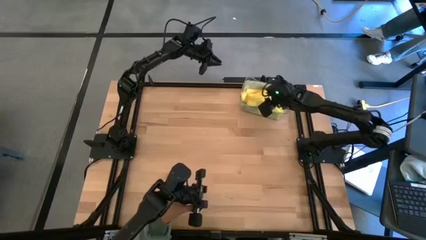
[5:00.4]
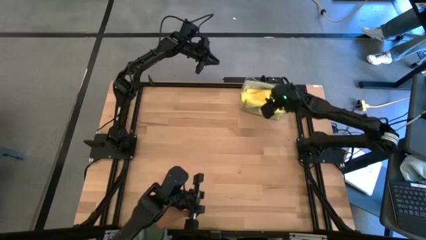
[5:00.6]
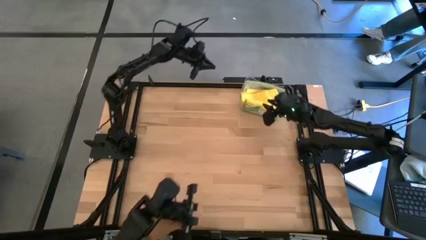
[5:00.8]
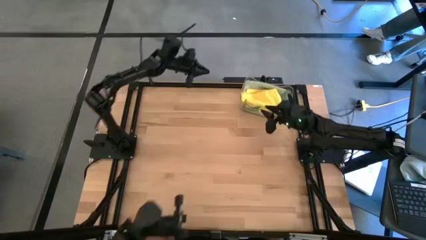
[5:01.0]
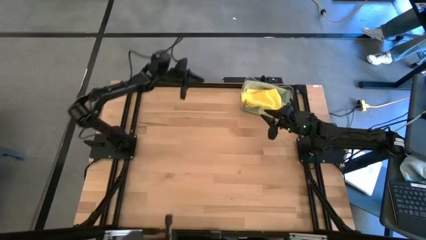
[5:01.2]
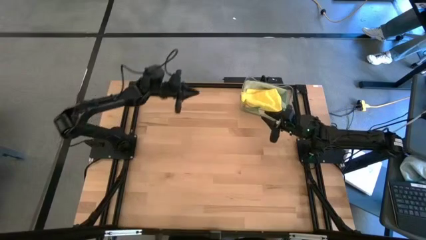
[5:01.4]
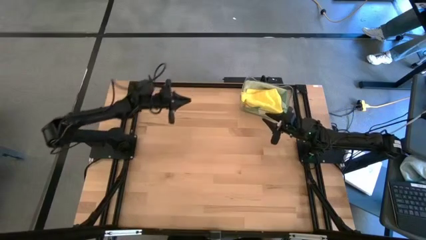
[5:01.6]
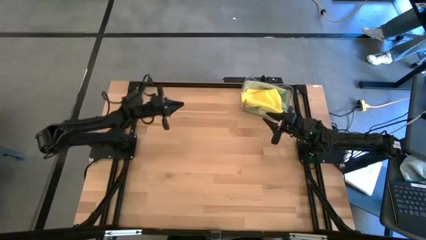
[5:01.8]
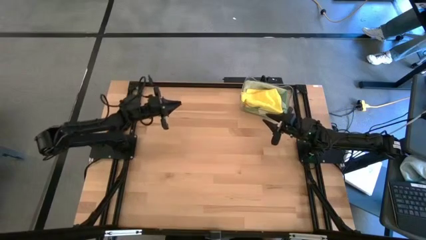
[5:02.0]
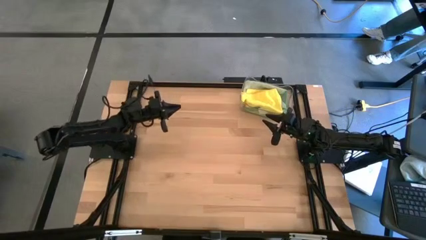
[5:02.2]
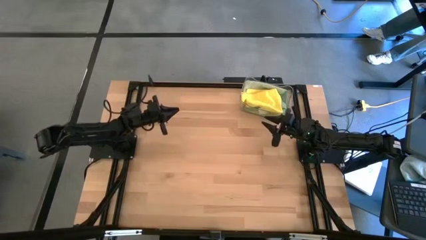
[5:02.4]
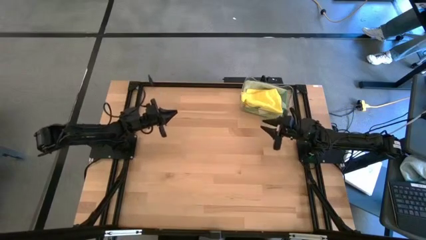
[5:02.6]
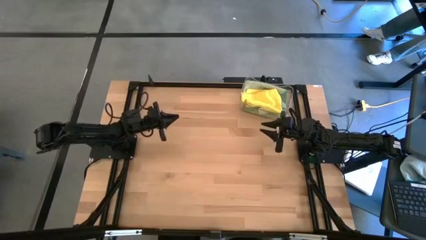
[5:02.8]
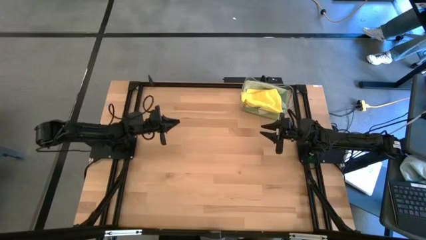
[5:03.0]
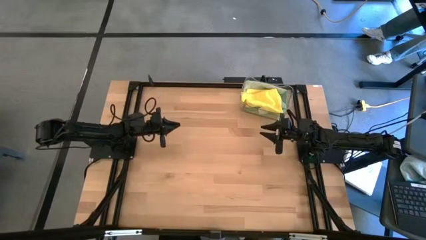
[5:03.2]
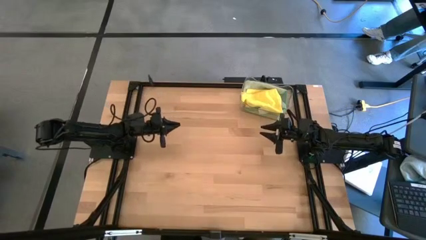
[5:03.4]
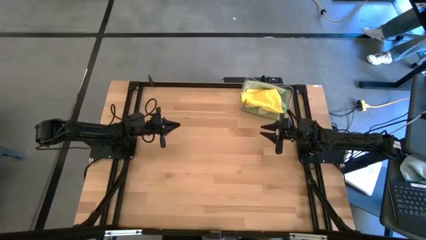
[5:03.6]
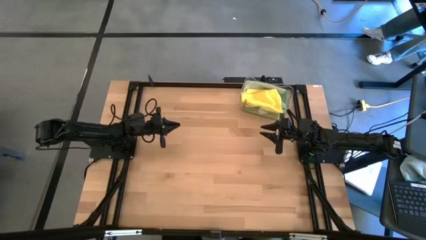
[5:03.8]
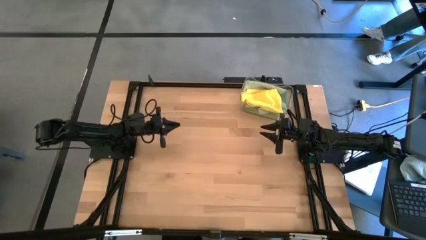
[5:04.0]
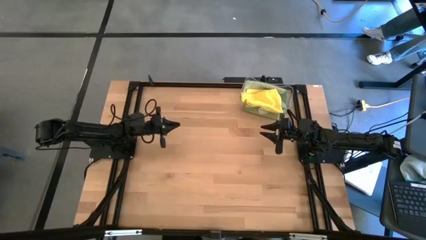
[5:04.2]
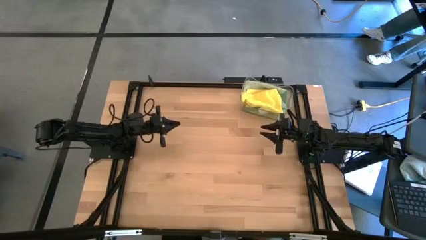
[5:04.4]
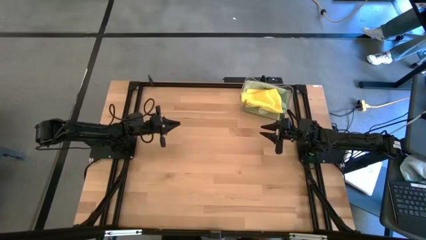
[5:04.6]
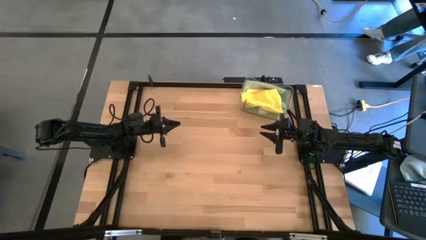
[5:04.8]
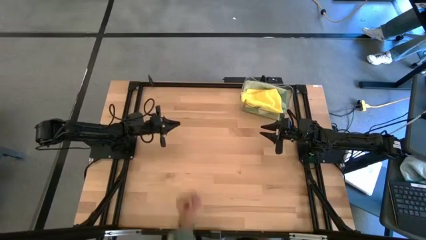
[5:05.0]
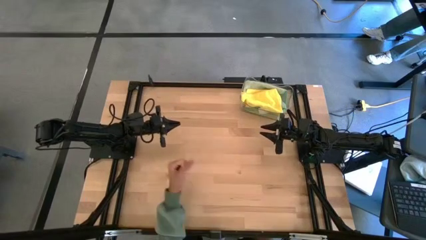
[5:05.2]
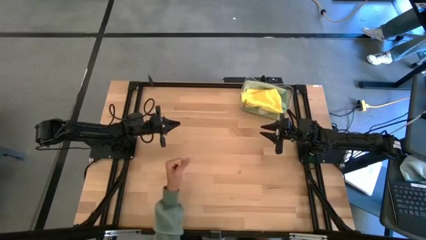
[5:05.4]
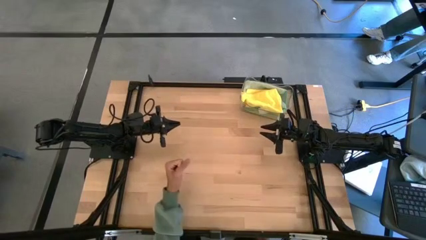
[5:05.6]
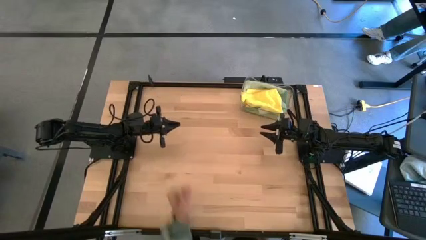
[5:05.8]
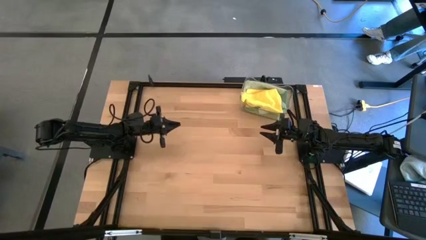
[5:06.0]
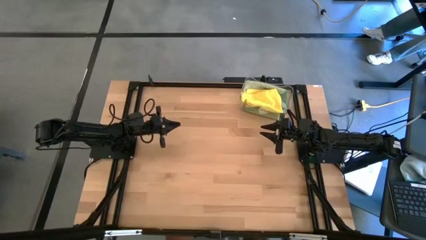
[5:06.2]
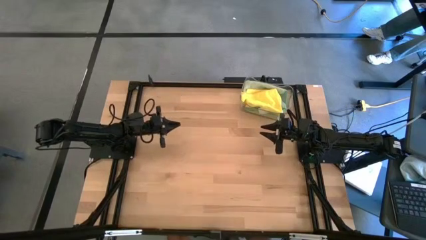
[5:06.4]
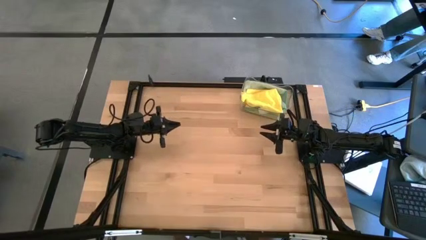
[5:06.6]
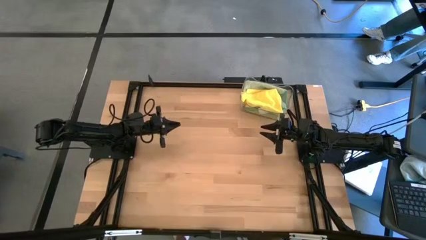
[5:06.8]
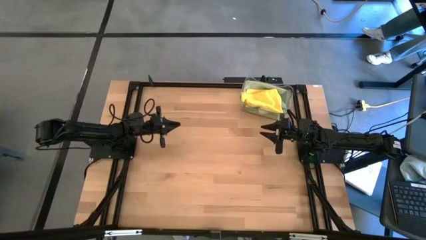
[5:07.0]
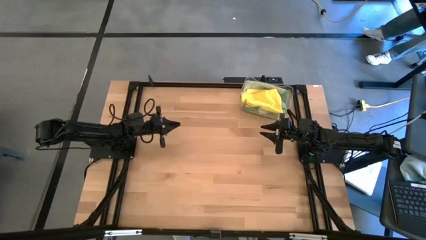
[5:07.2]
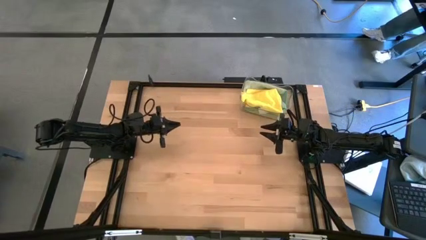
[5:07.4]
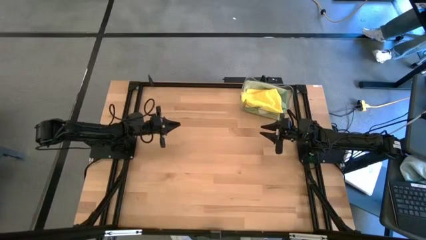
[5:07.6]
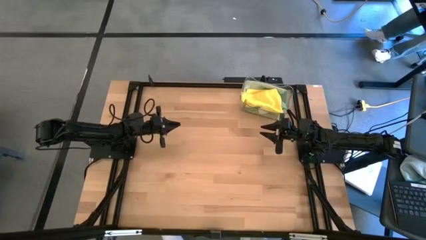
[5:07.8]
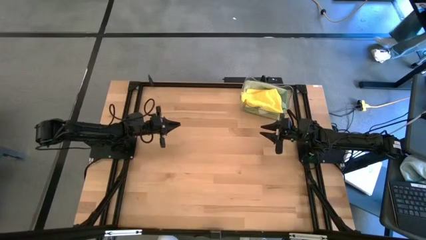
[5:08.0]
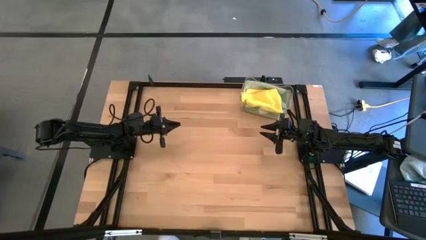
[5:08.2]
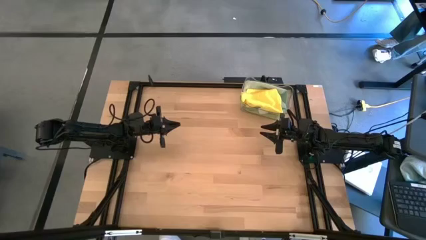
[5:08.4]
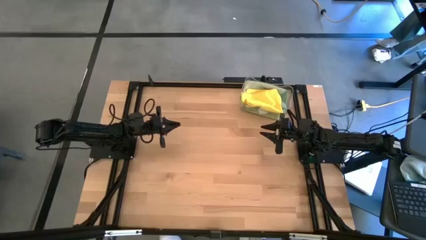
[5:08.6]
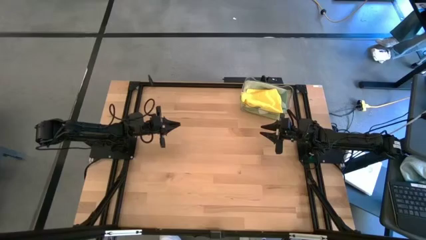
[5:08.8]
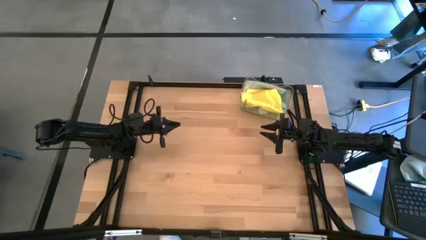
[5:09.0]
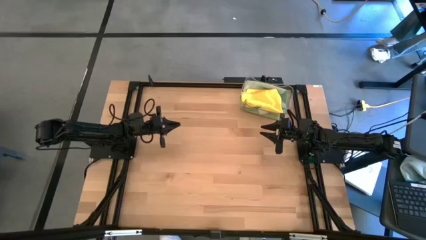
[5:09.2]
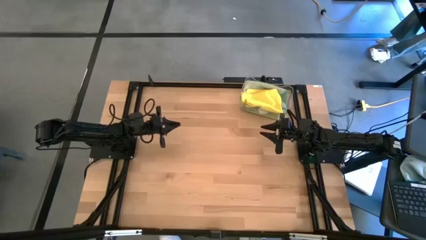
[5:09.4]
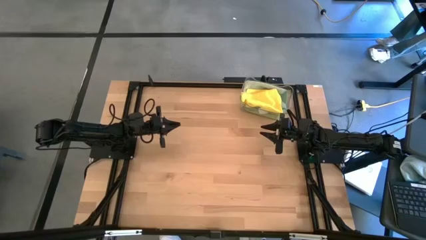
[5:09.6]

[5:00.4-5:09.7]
Task: Fold microfiber towels
Return to Home Position

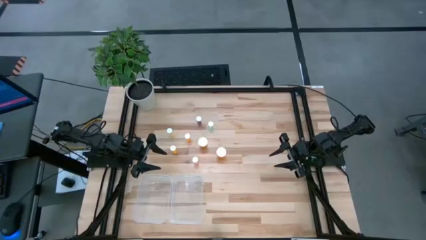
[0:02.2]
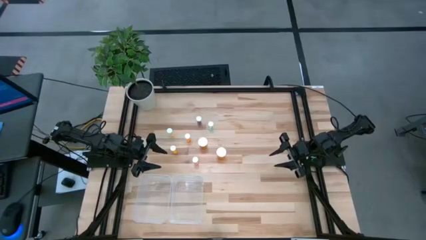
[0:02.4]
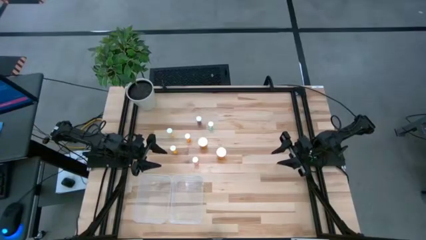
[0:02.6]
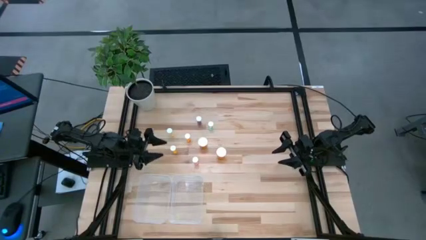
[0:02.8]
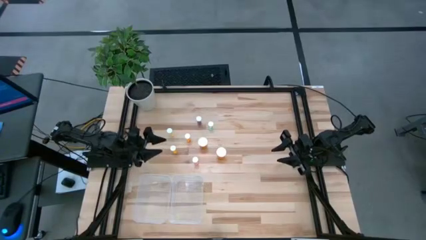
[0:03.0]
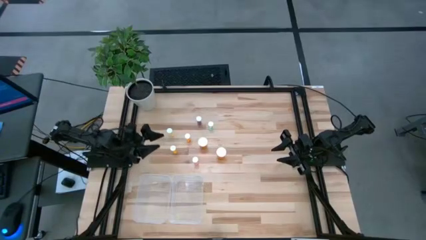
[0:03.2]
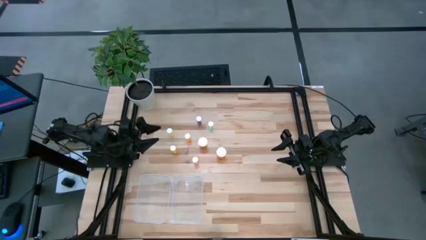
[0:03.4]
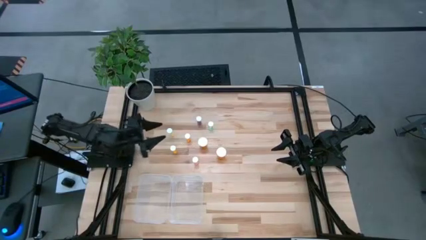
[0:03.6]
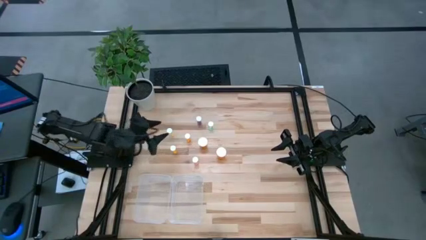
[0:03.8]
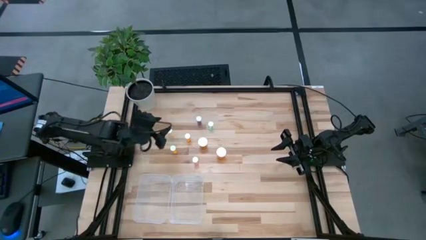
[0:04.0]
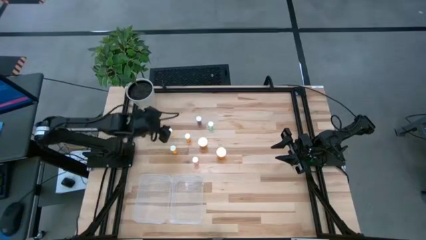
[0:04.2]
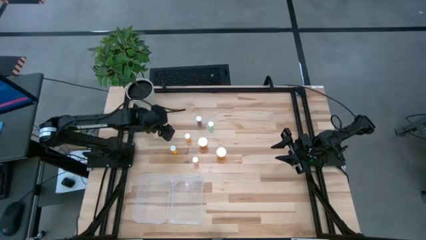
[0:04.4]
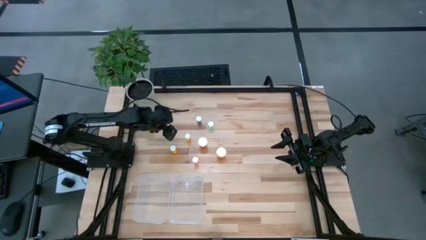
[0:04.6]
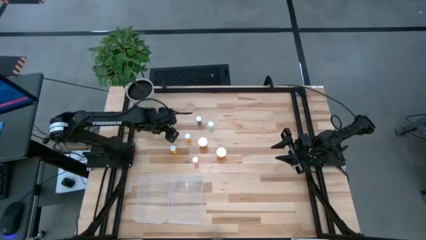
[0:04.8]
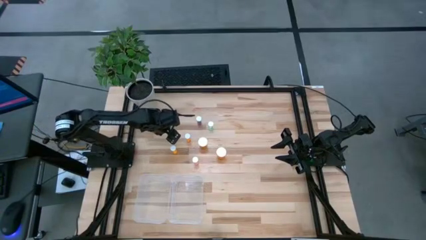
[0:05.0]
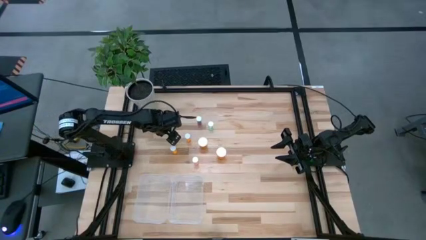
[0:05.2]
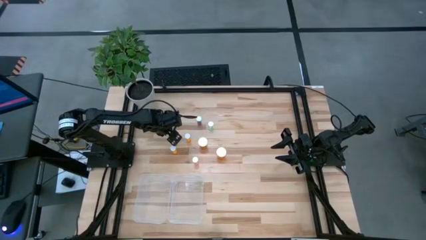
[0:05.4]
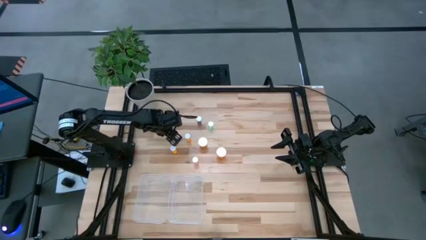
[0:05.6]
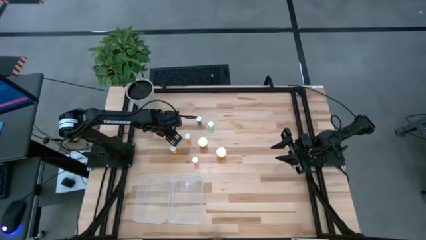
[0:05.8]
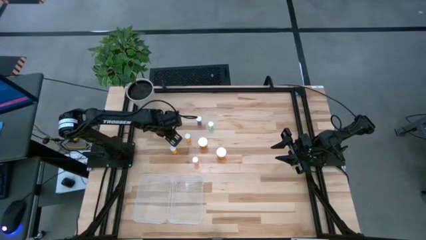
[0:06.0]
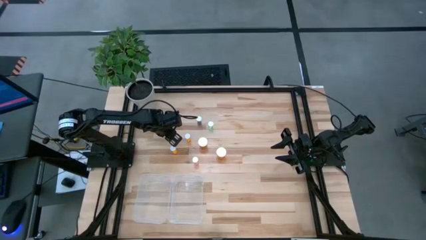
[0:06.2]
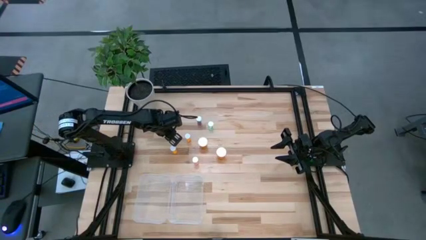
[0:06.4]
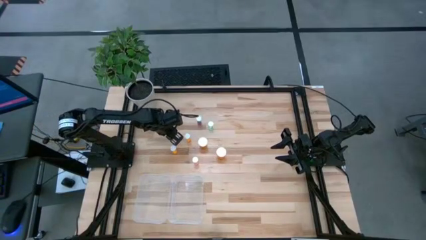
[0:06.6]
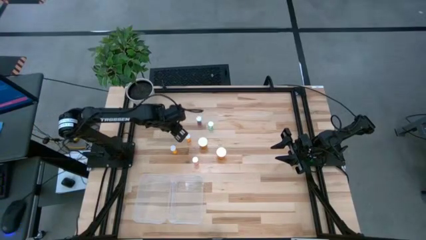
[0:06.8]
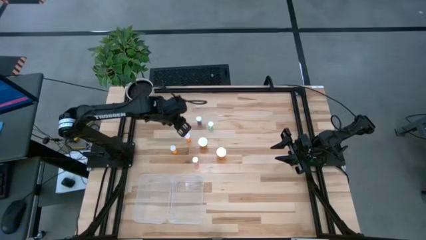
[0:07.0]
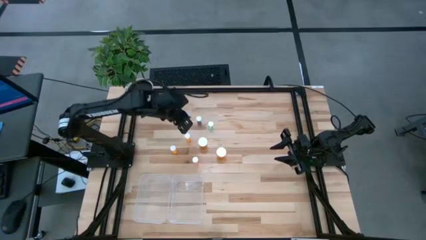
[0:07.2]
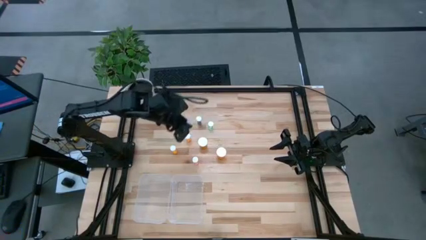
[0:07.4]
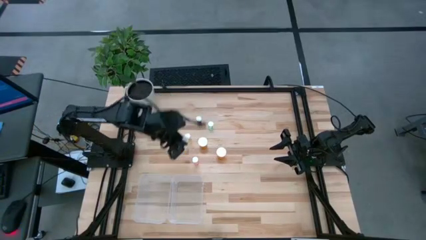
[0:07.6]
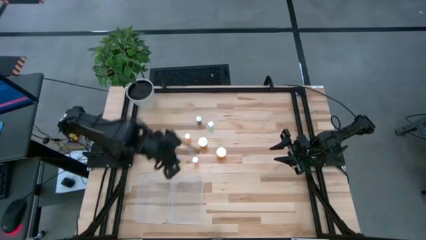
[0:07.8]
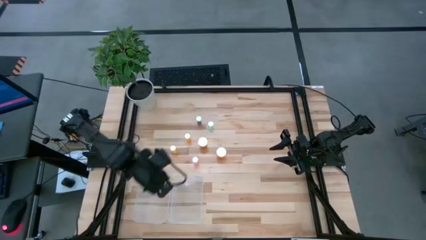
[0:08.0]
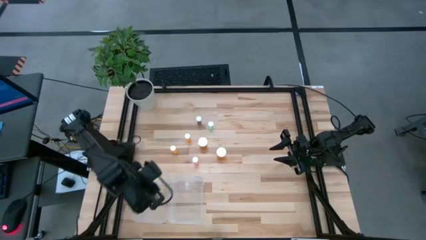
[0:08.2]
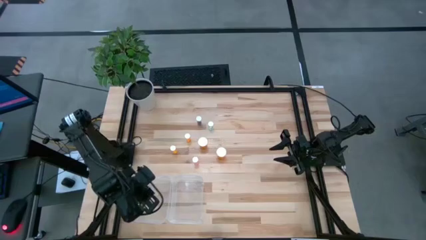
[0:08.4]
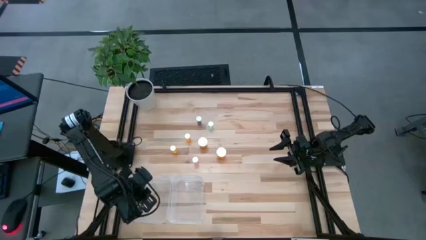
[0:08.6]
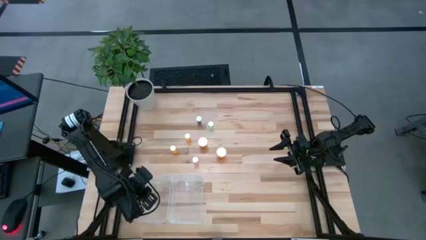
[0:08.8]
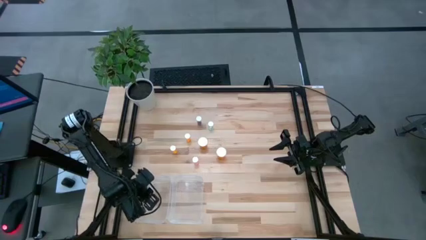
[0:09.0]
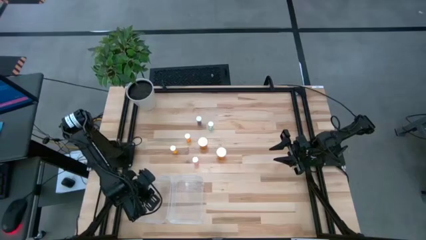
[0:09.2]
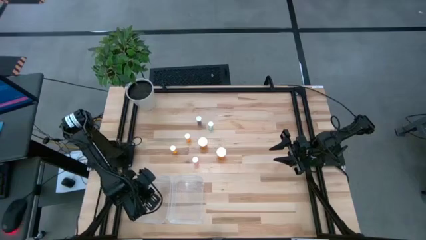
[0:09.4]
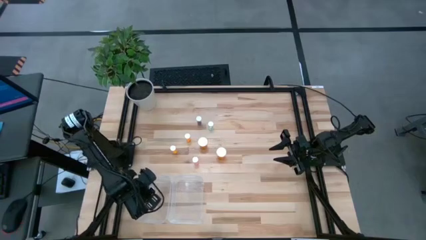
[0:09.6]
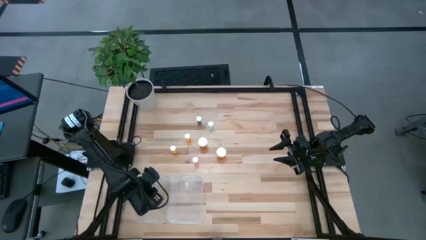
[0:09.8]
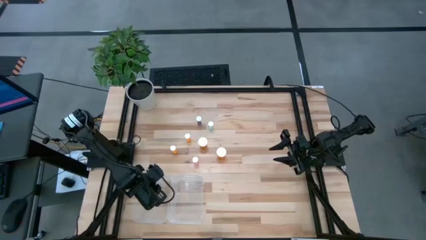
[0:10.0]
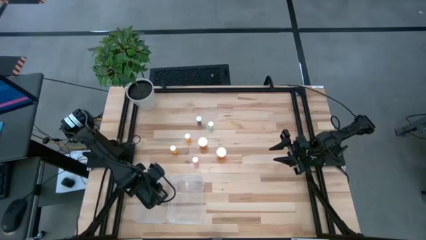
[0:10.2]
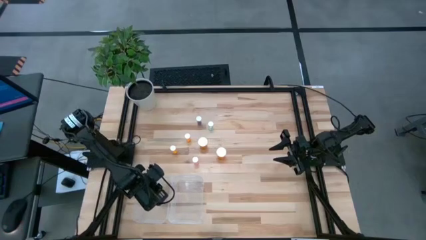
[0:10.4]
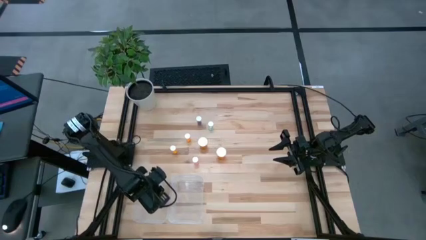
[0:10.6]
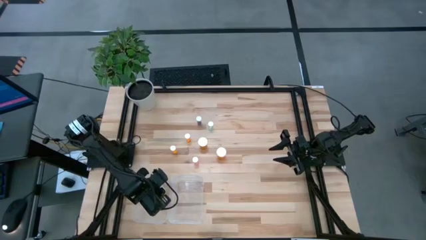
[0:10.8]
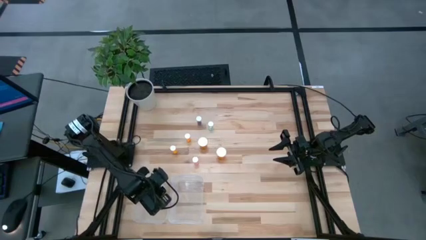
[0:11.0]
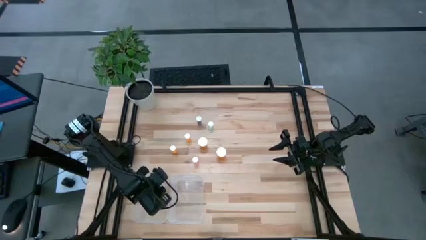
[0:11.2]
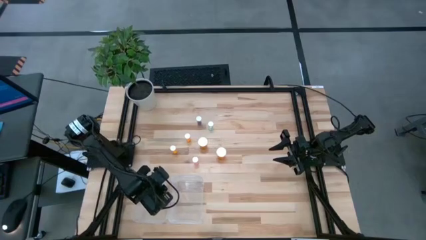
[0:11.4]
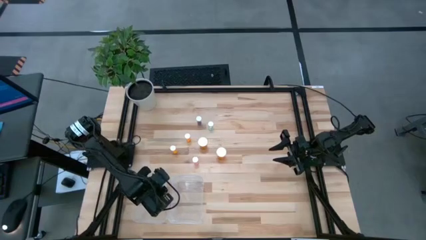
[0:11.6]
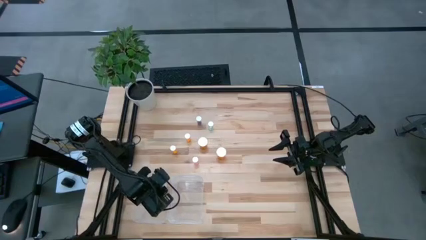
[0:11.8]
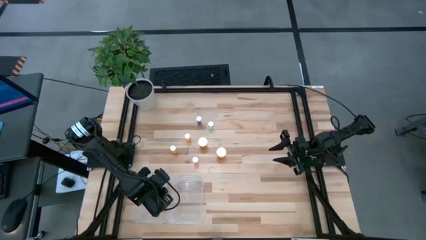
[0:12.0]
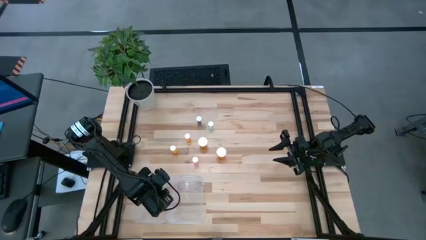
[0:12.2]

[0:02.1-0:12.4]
Task: Pick and place medicine bottles into bin by pill shape (circle, oval)
Put the small yellow tablet bottle into the left transparent bin
